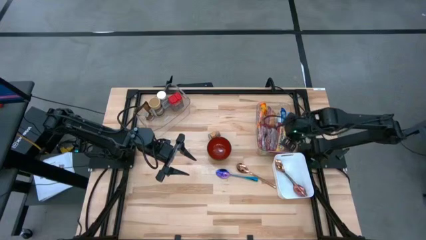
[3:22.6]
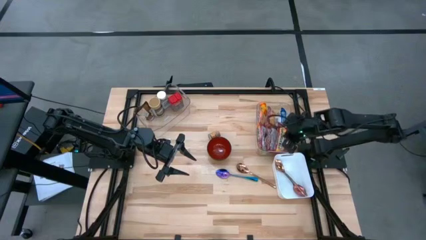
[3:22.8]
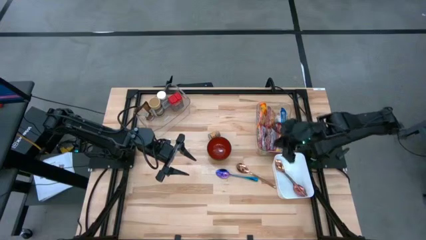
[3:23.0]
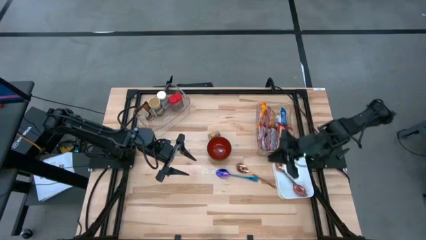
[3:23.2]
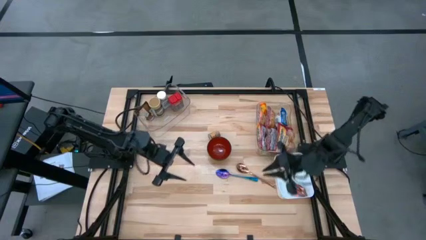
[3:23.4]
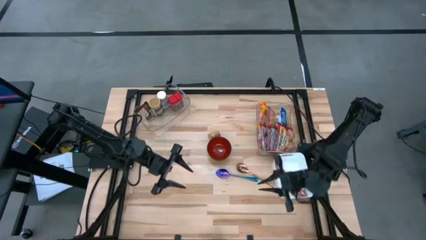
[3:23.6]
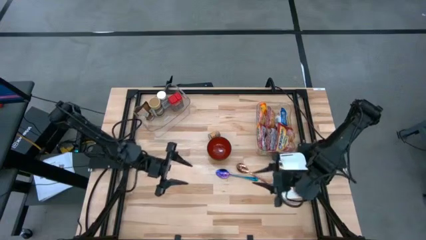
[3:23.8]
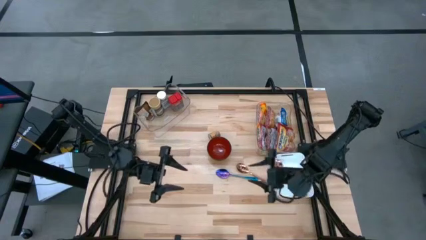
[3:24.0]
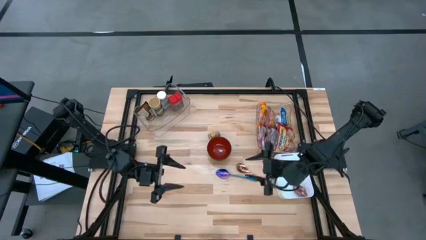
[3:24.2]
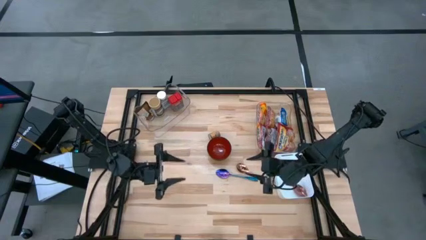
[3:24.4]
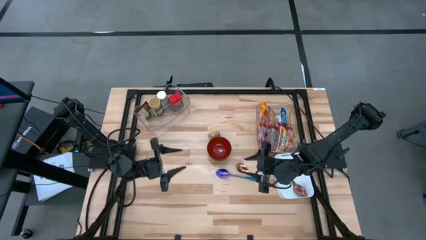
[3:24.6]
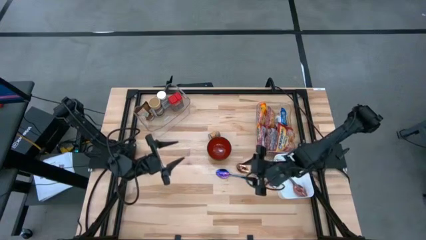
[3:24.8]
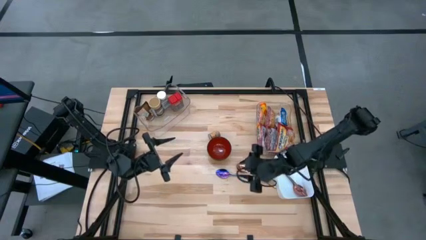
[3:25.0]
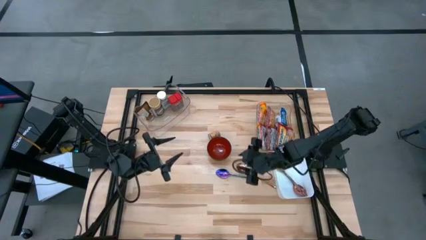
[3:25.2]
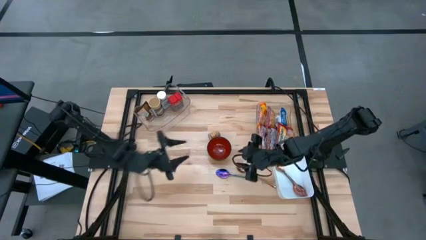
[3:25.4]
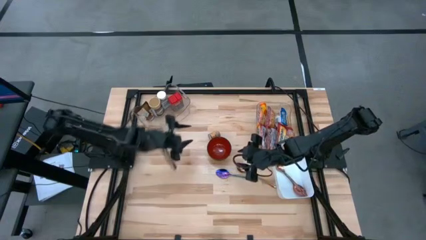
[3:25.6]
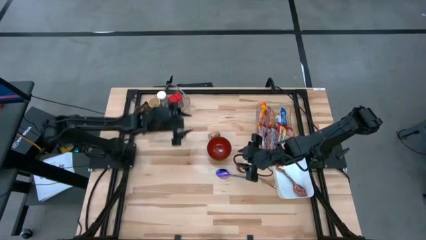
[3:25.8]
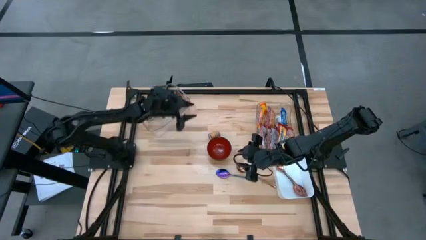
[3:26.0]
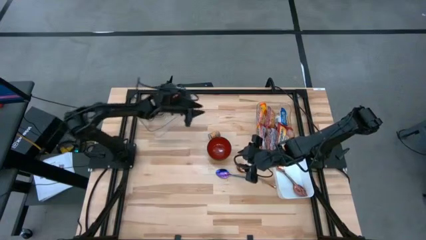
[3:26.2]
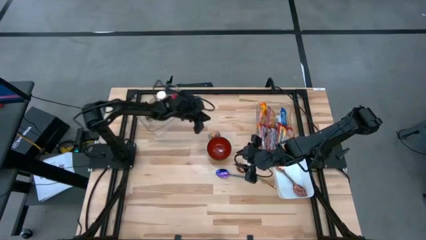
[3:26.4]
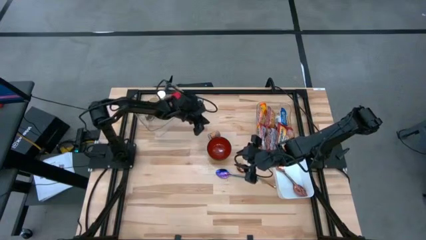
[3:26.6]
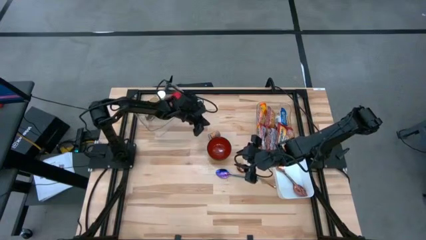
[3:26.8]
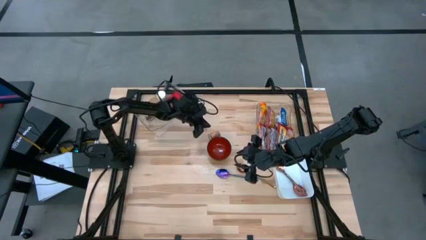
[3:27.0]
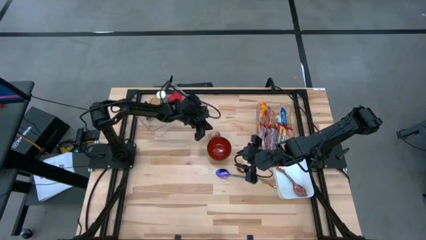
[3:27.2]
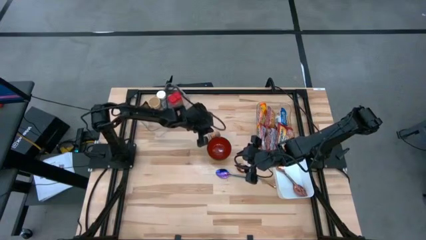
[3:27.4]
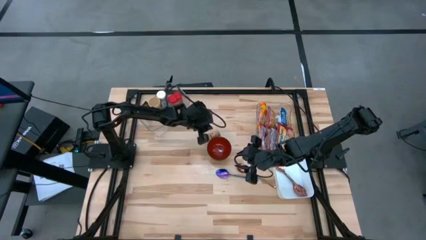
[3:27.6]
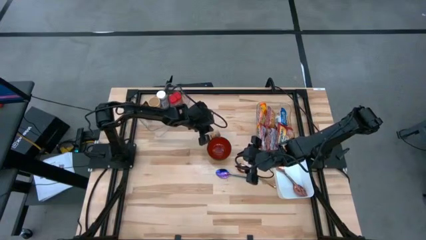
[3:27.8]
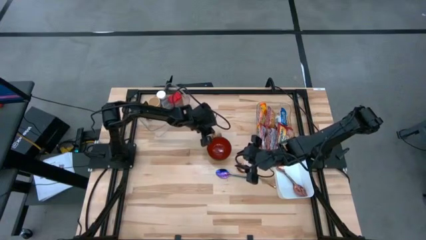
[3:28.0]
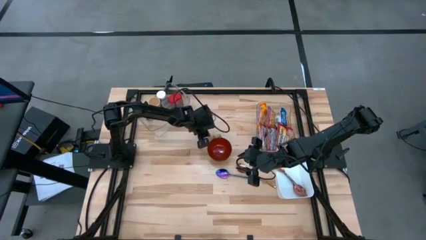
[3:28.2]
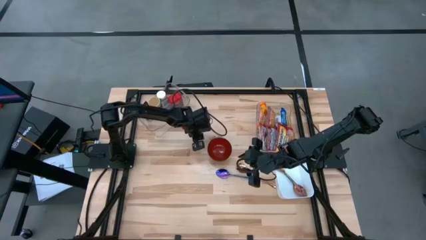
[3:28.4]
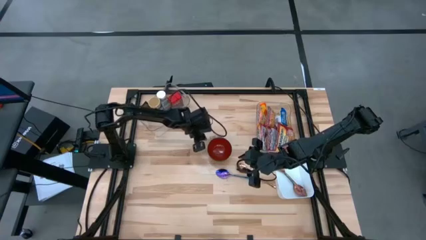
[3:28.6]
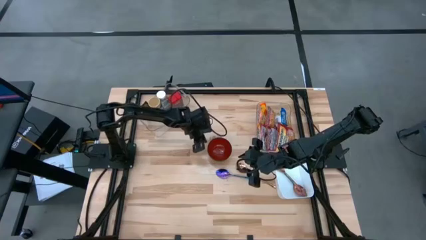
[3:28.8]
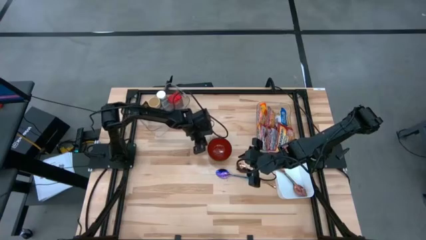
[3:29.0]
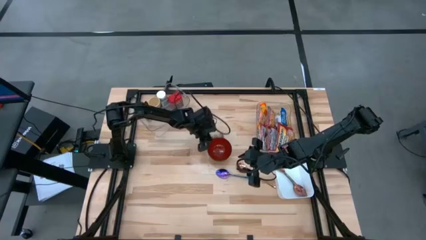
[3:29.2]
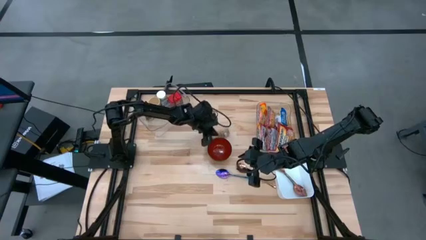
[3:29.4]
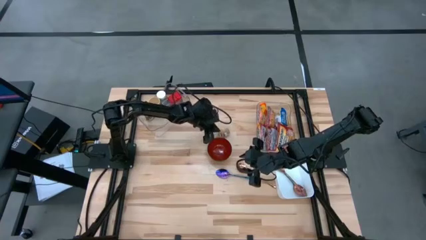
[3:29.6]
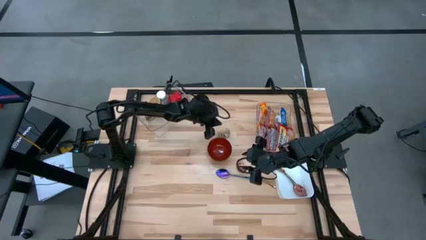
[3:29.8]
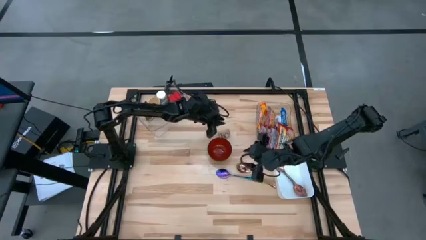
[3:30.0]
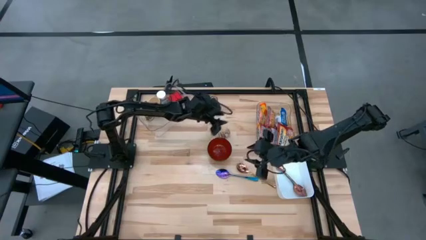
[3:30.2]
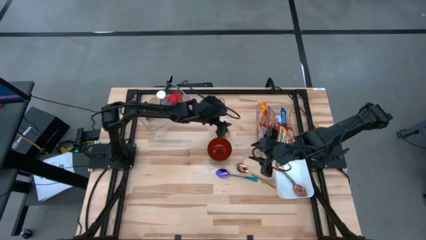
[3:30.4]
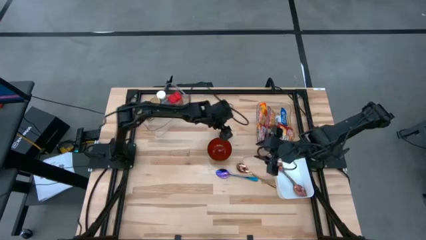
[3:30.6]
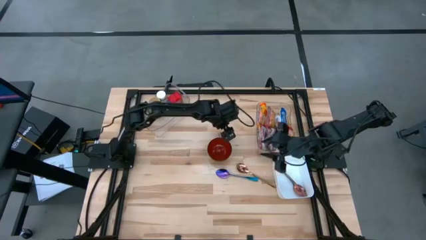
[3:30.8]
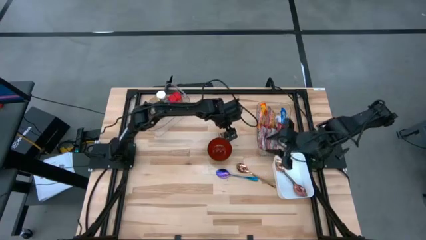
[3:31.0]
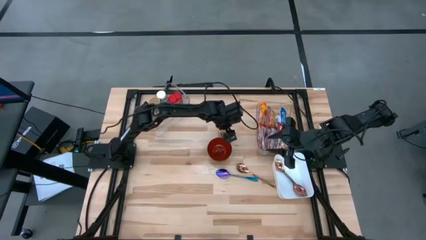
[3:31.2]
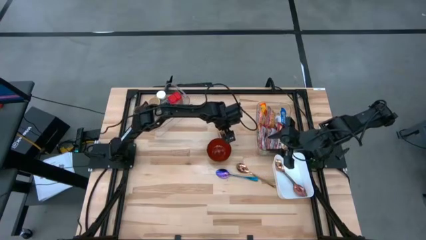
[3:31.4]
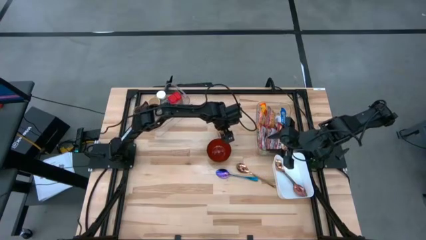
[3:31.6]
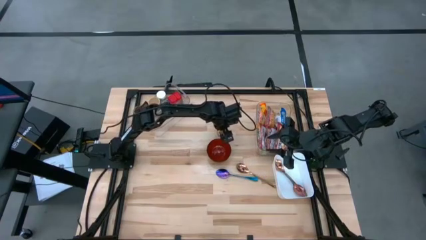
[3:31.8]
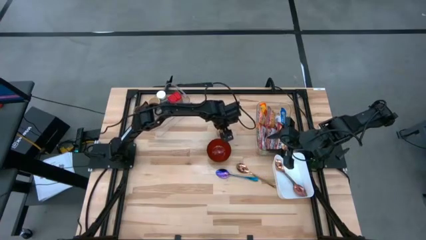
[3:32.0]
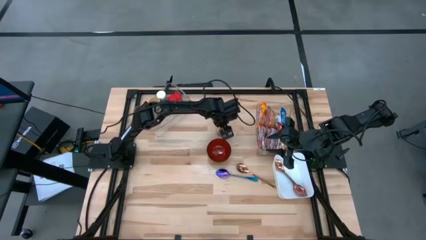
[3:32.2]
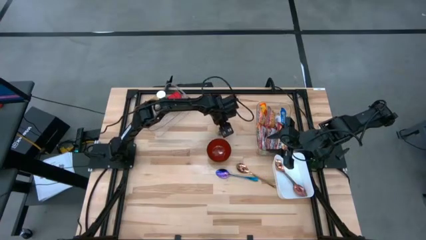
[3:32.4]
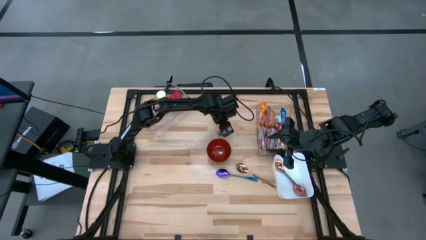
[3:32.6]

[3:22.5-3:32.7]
Task: Pick & Place Food Item
Put the brown seasoning bottle into the left transparent bin

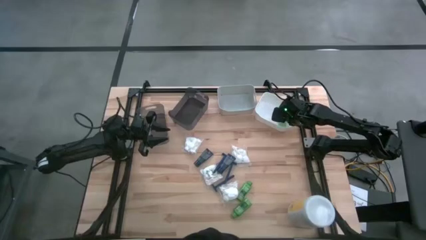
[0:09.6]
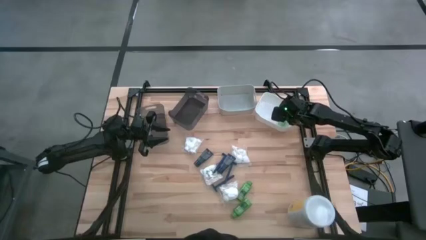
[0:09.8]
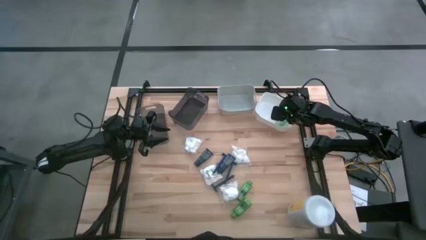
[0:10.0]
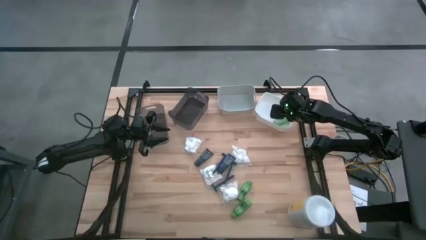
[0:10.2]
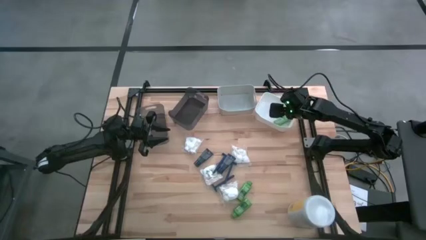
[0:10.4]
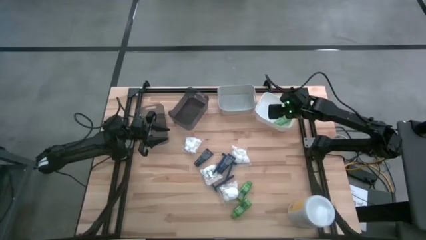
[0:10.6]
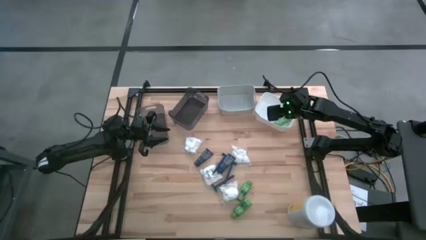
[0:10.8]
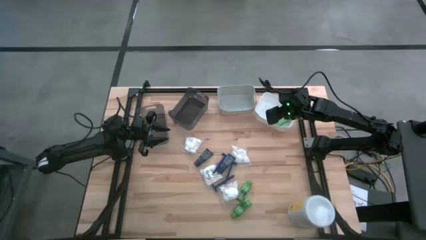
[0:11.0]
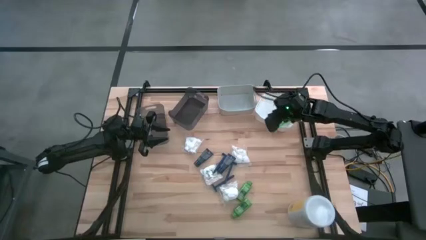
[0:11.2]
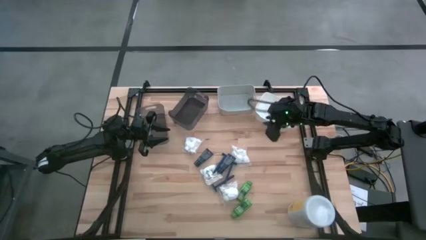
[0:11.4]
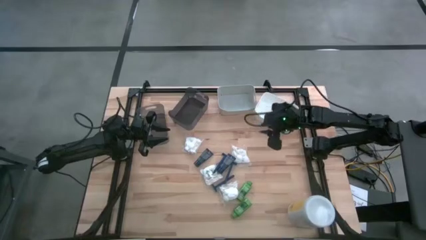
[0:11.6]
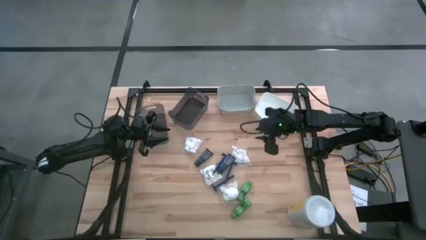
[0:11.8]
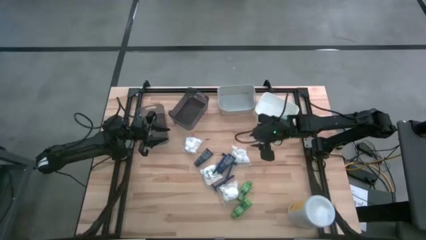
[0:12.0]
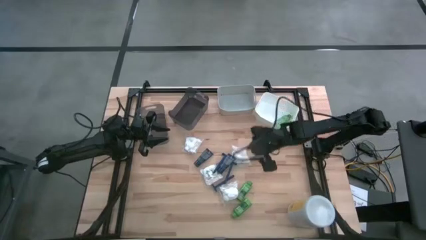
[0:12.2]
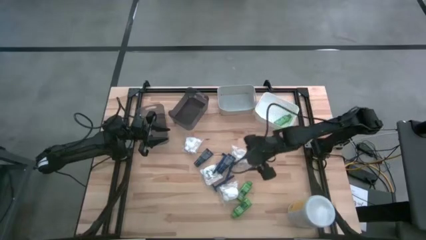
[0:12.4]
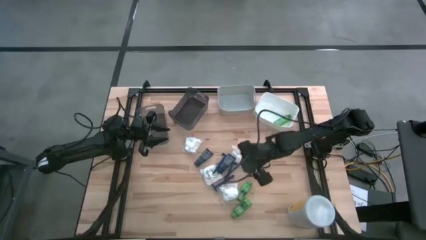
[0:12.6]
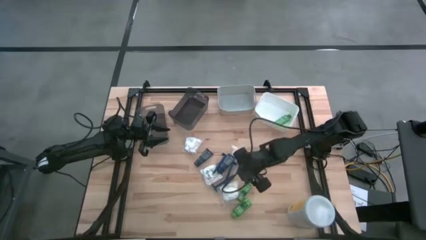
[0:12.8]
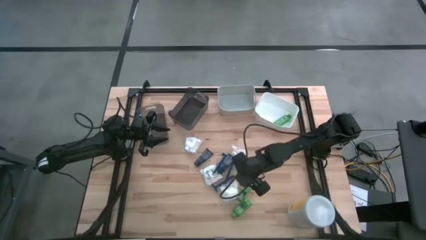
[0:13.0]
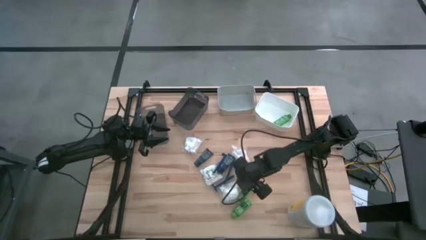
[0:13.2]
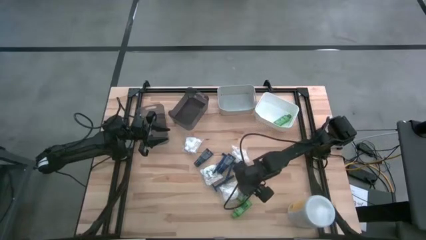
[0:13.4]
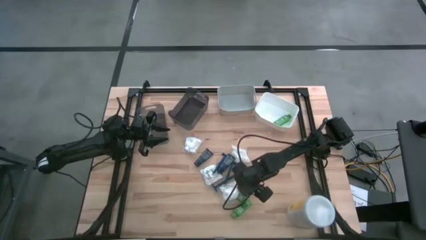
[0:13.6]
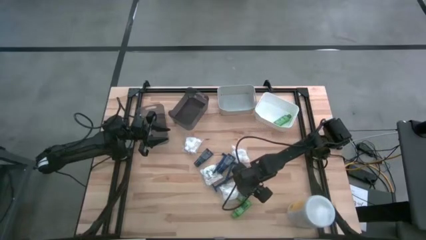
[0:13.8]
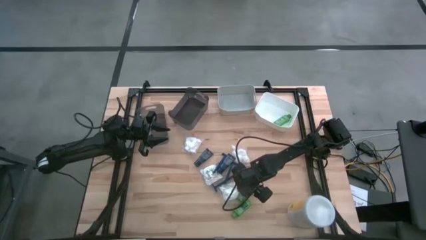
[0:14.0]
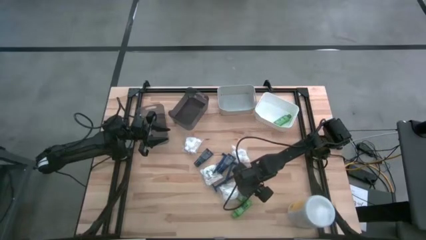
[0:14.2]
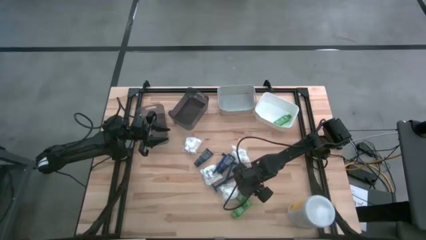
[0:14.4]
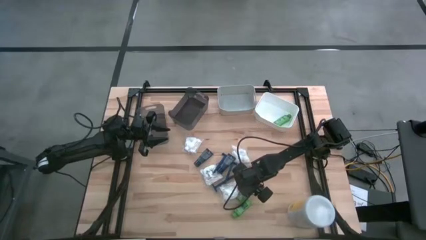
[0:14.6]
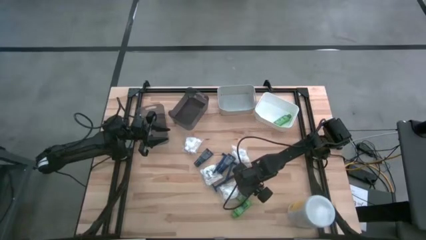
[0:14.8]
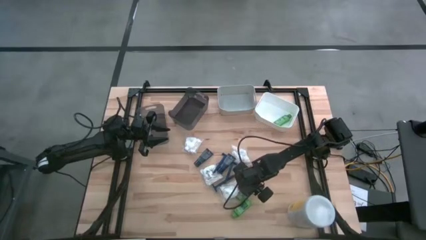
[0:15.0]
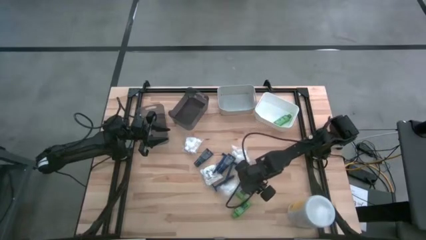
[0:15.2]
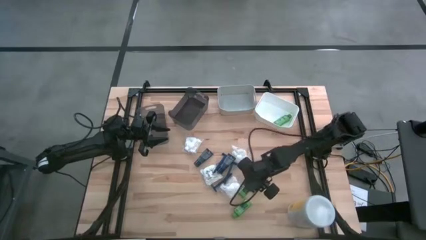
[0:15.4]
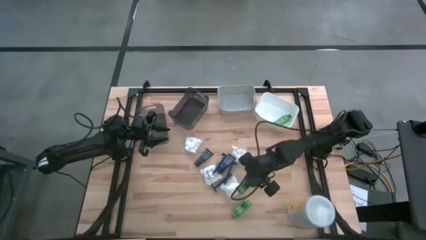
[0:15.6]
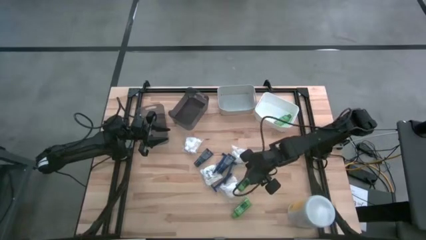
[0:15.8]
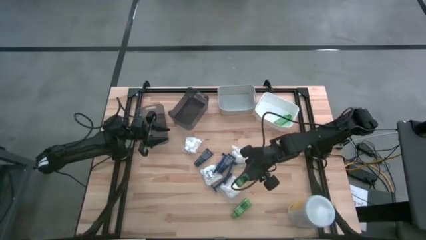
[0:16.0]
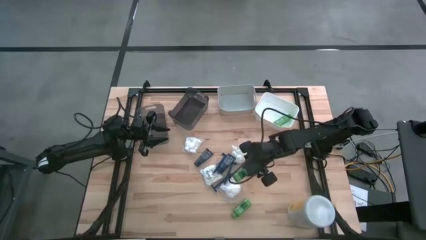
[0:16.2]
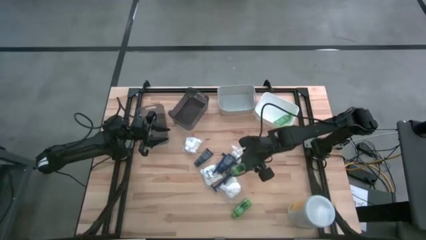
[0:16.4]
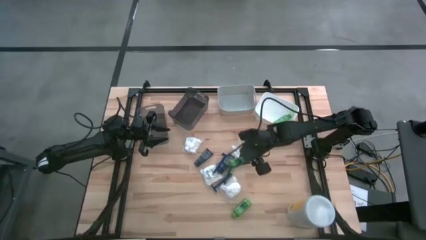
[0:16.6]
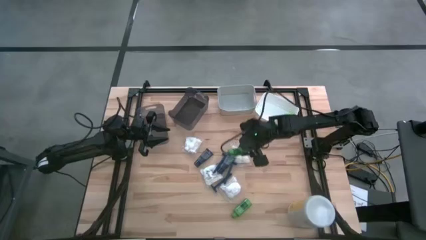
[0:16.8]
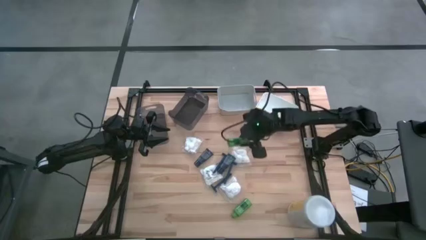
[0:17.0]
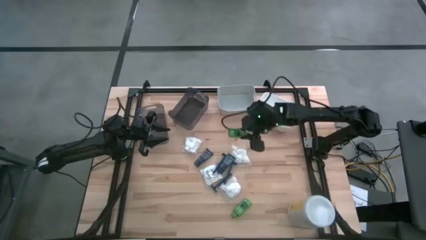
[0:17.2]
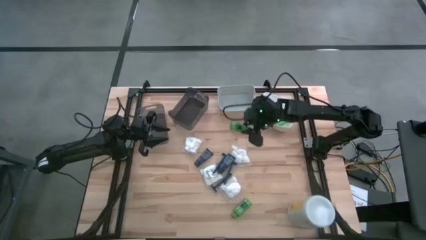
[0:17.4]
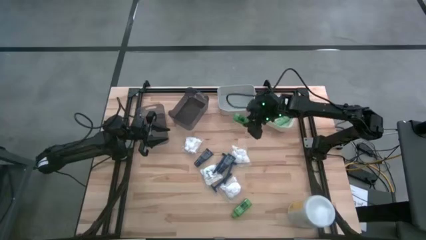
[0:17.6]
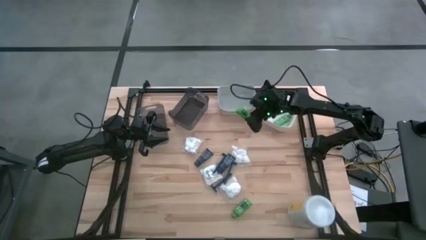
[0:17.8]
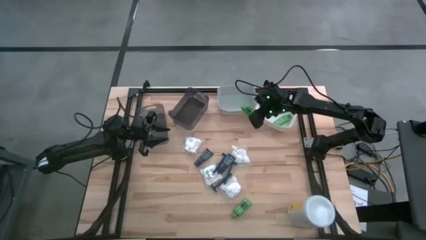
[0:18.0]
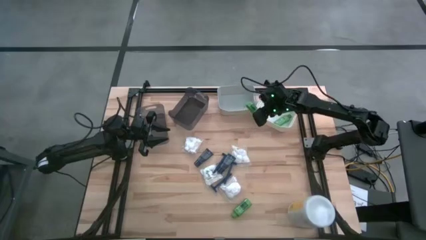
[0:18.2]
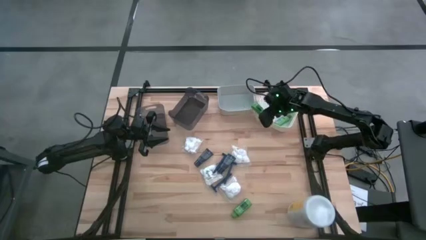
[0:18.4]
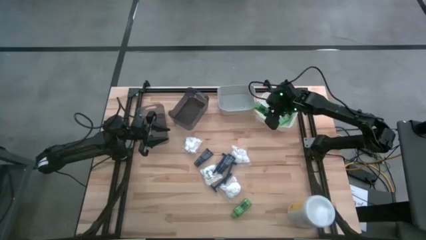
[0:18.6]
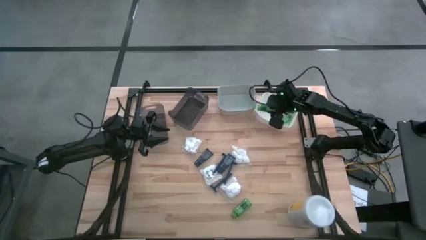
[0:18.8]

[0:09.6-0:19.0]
Task: Pick & Place Travel size toiletries
Put the top green shampoo into the white bin
